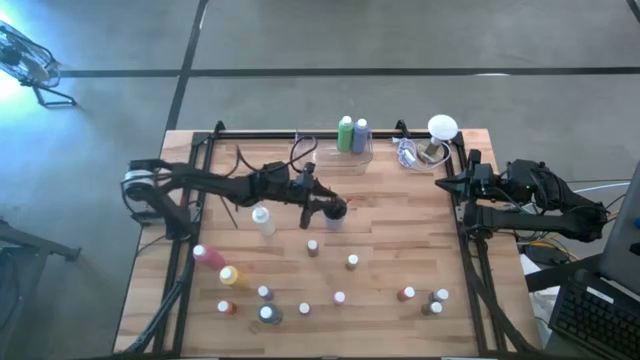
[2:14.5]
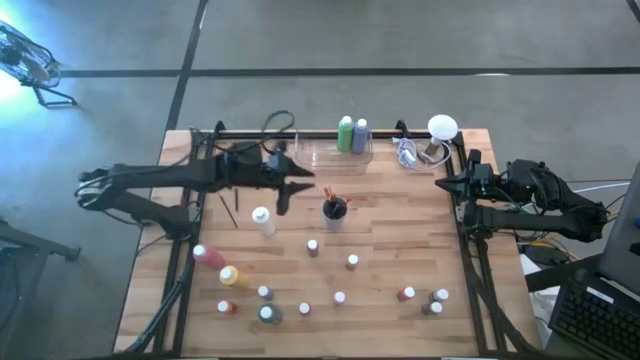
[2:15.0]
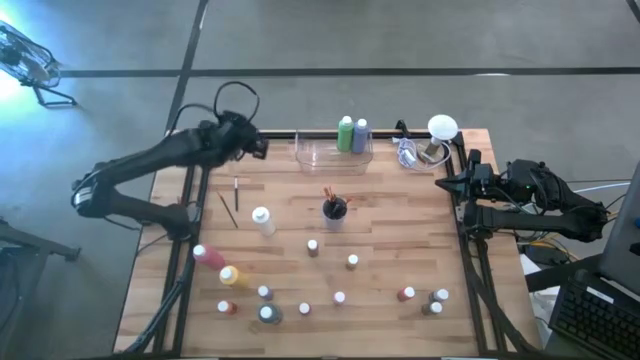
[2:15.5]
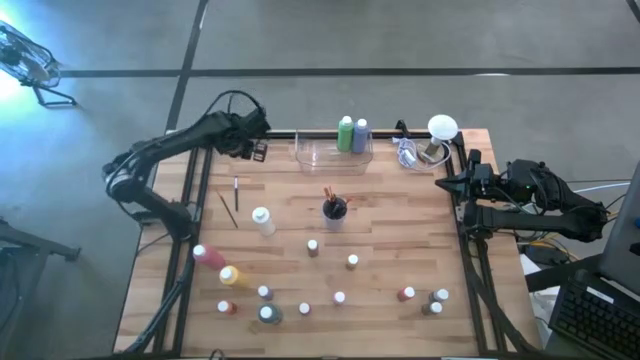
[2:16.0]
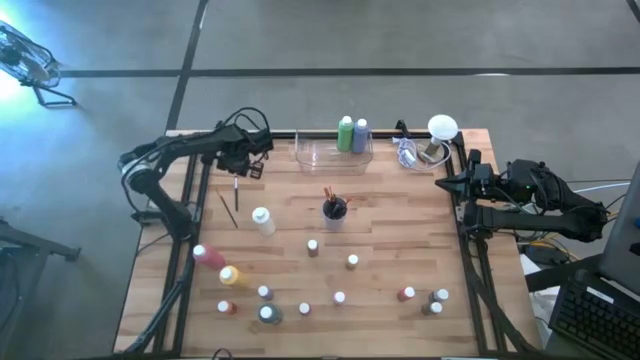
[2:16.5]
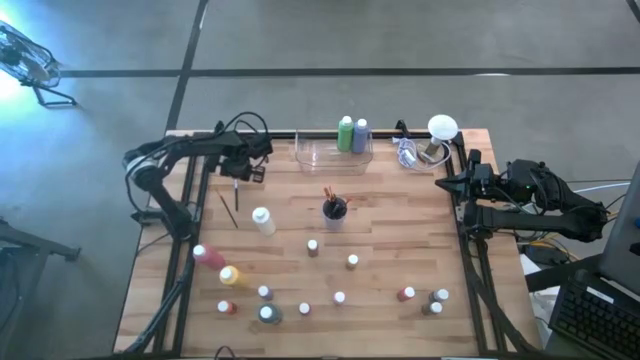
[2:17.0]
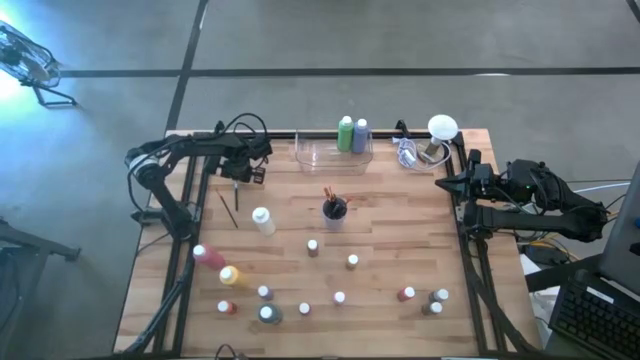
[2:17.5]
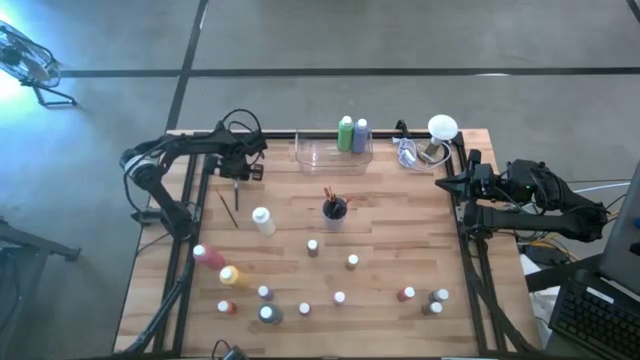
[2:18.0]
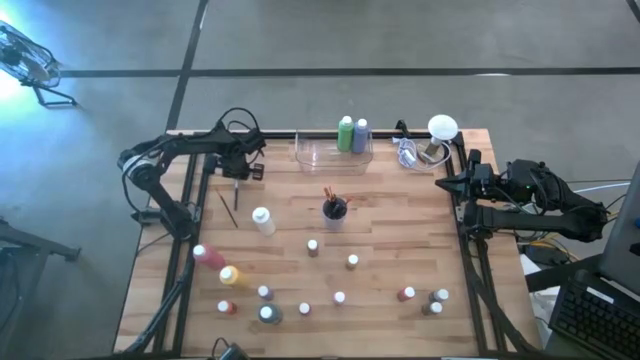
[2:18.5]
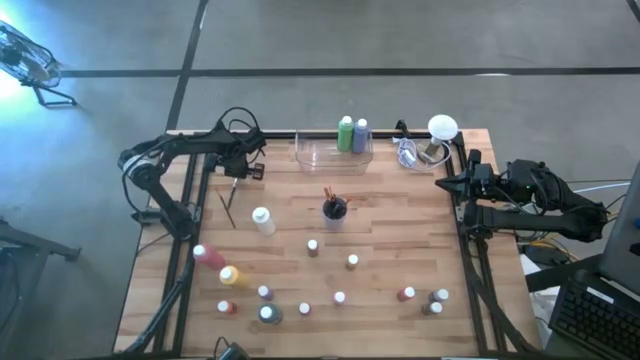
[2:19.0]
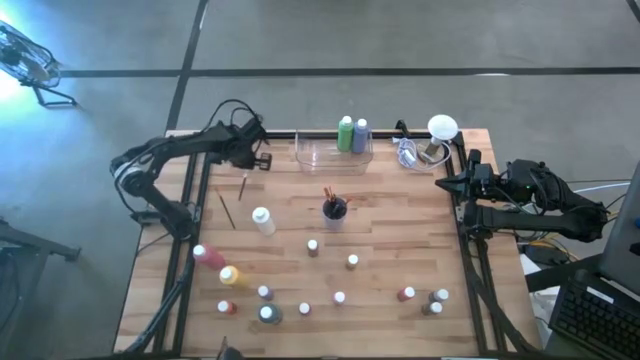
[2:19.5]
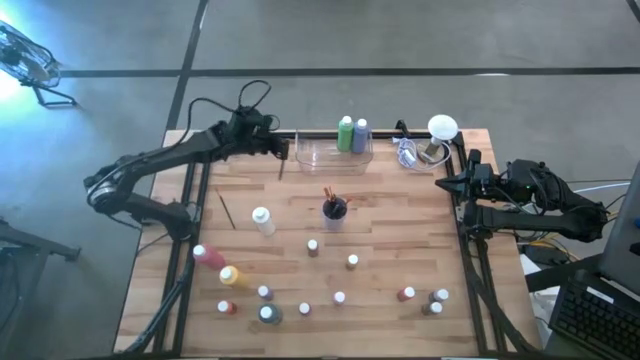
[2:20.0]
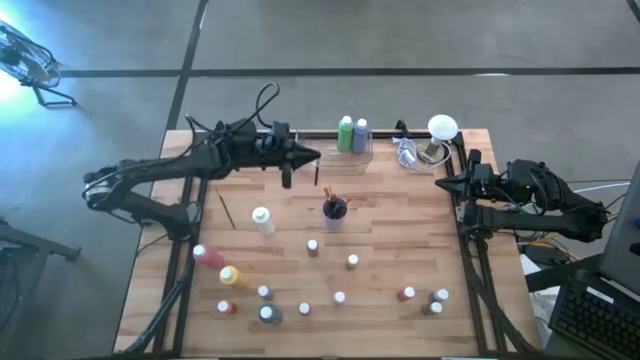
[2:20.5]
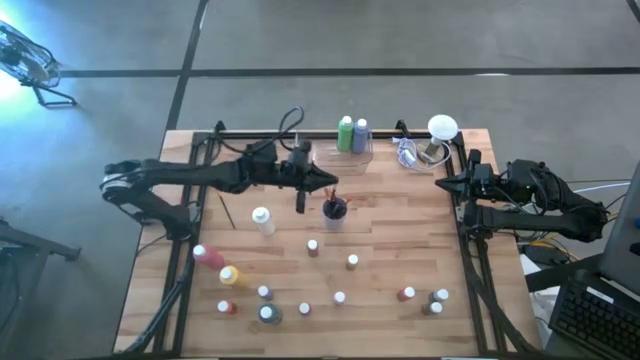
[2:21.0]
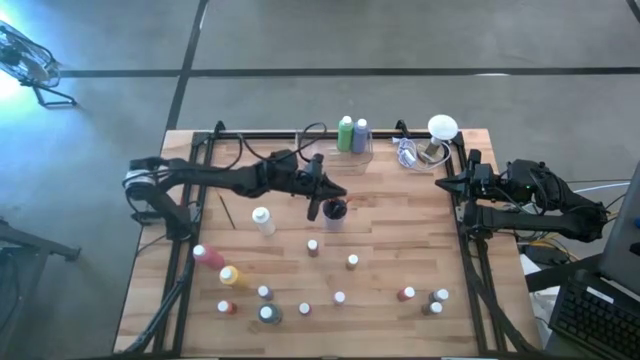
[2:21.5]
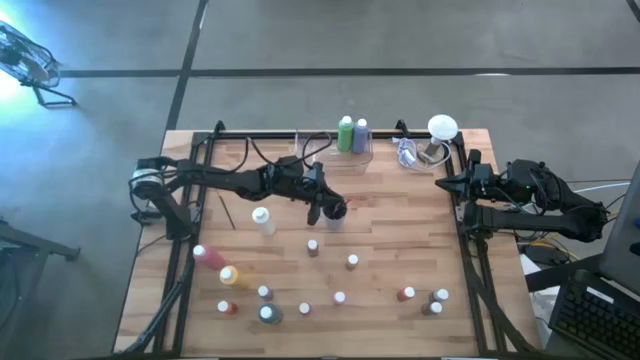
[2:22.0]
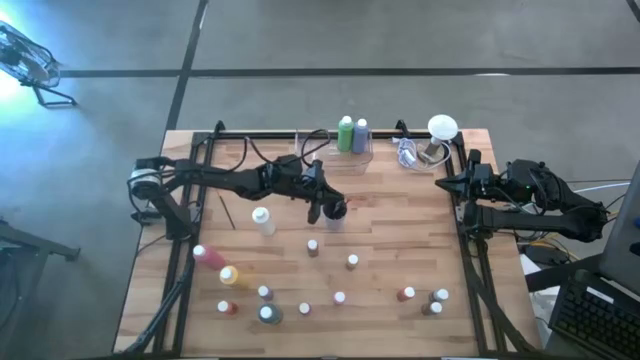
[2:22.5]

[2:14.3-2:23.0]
Task: Pick & Place Paint Supplies
Put the silver paint brush into the purple cup

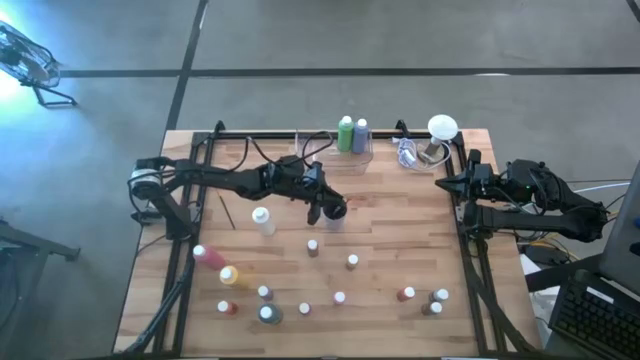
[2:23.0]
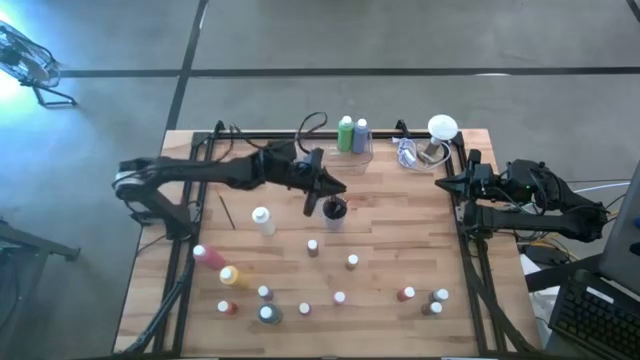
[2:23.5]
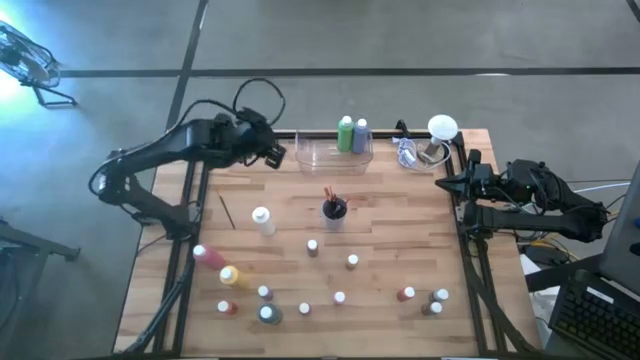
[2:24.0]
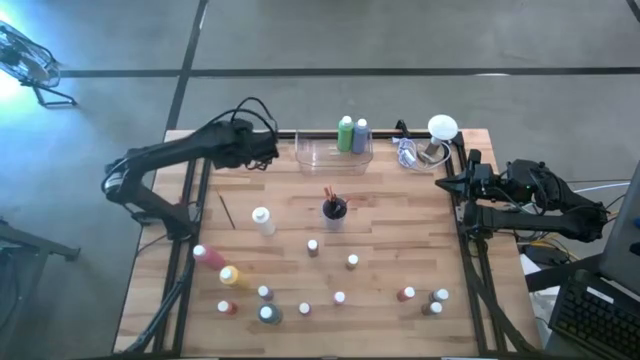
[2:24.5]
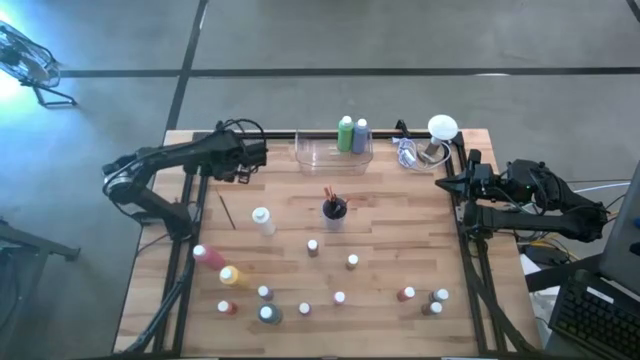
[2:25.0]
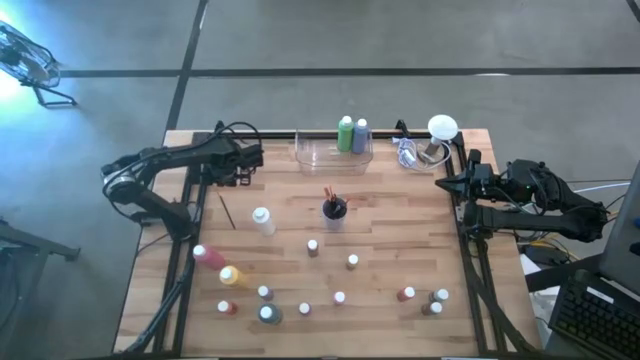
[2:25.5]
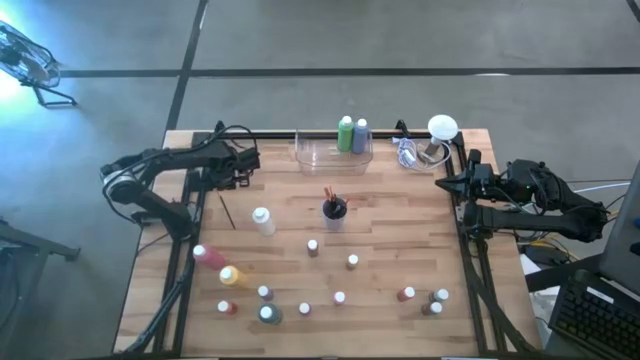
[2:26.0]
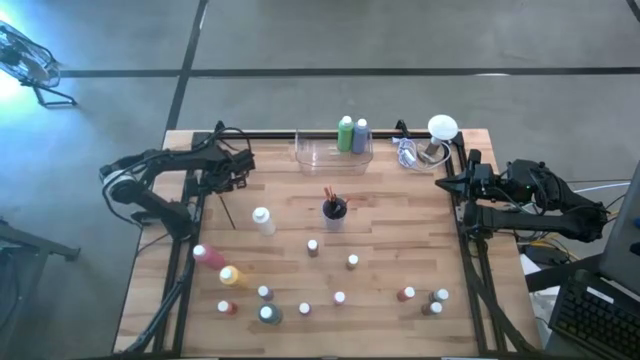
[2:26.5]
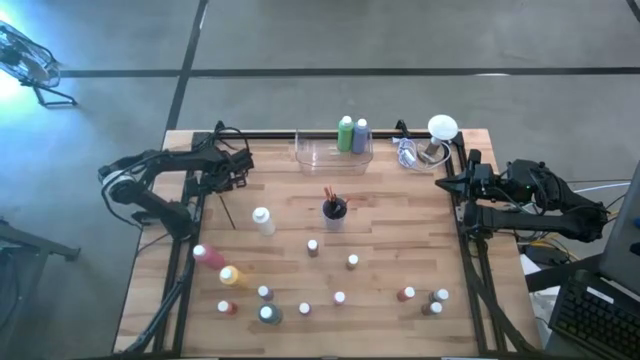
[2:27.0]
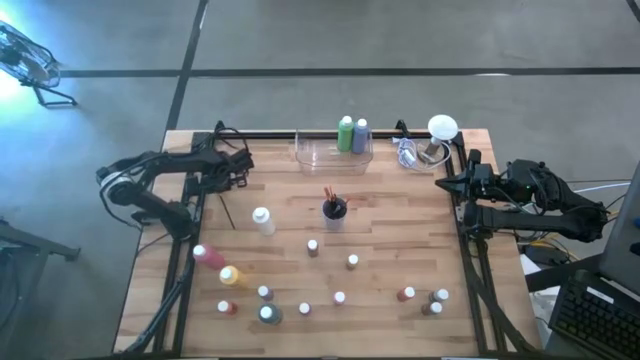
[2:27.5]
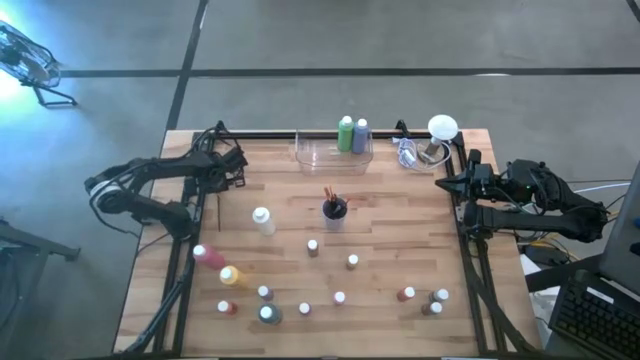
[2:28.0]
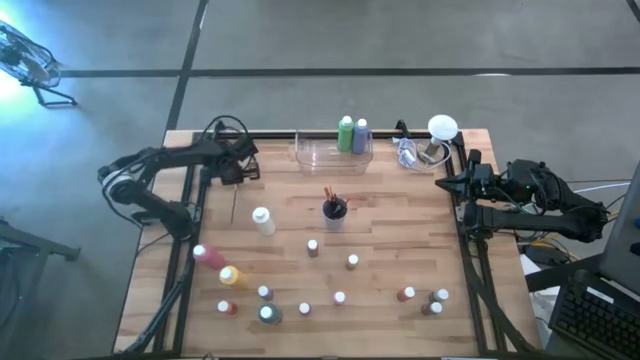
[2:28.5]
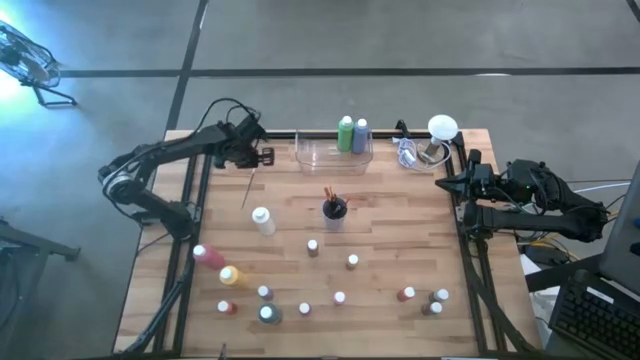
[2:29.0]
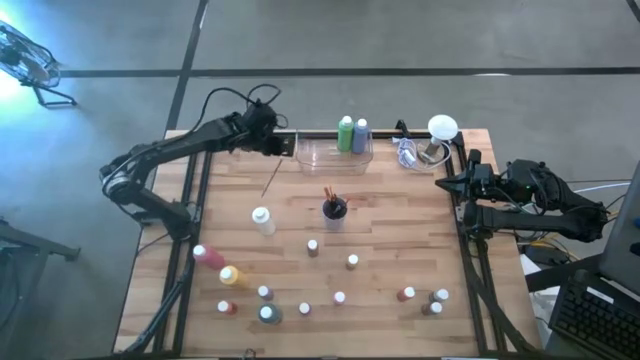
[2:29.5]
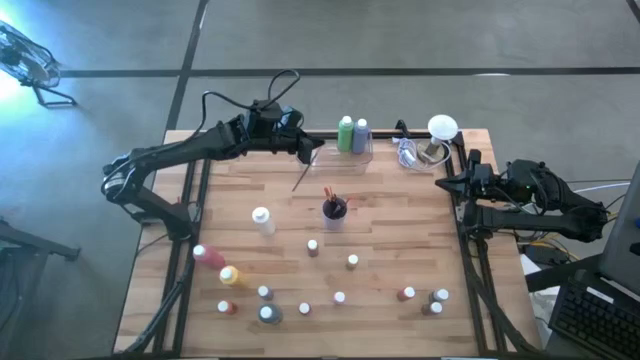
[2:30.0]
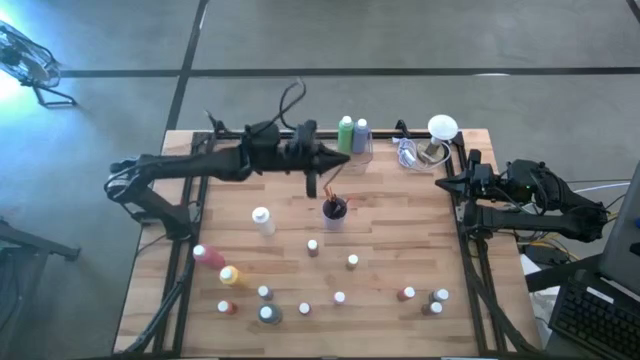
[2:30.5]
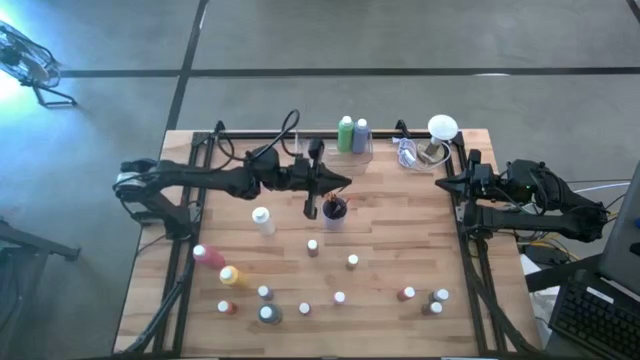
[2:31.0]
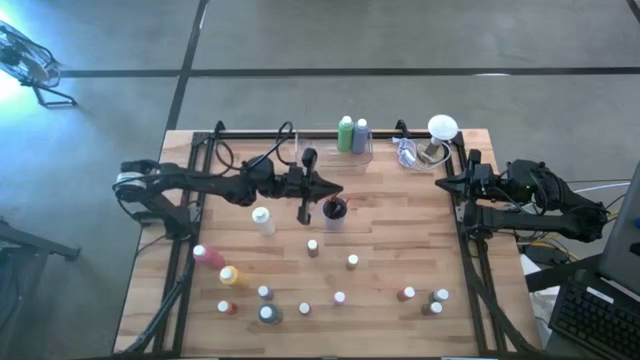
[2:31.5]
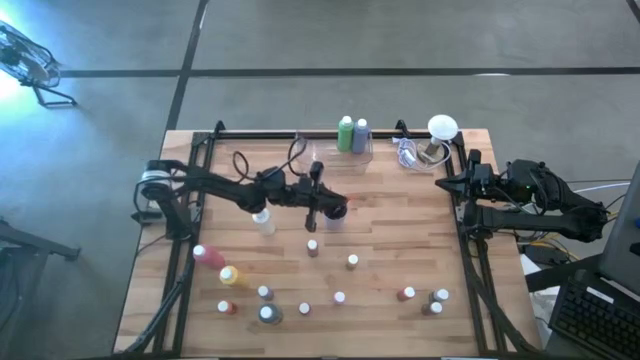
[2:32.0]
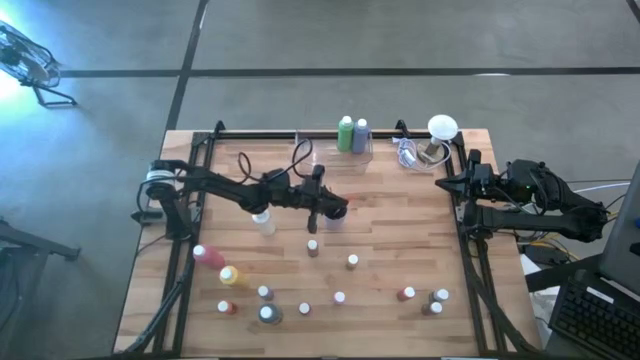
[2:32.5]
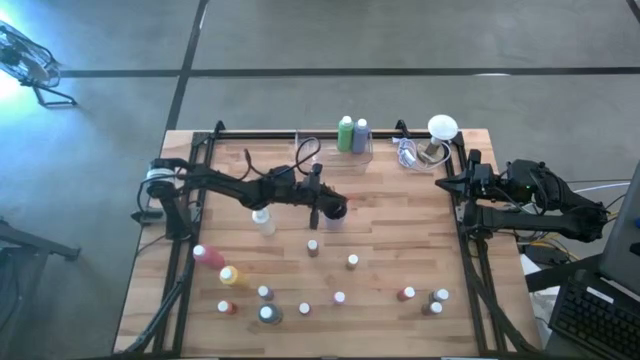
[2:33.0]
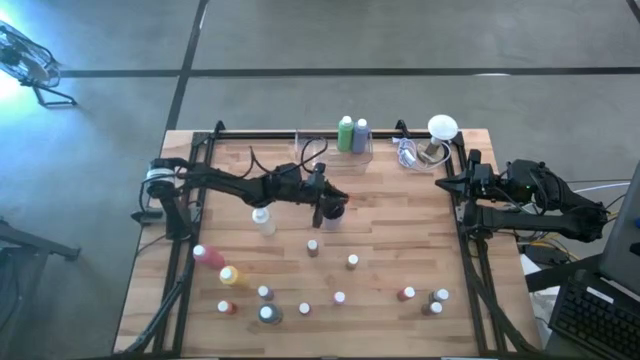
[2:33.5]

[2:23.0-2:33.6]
Put the gold paint brush into the purple cup

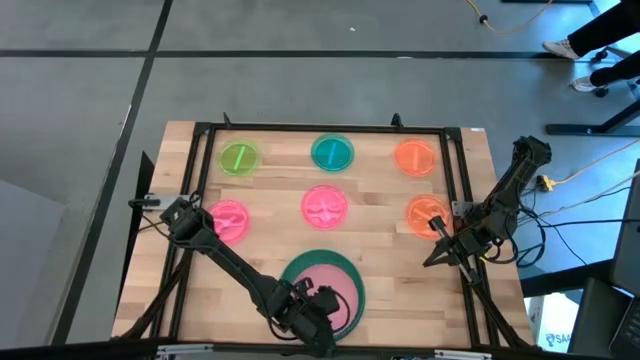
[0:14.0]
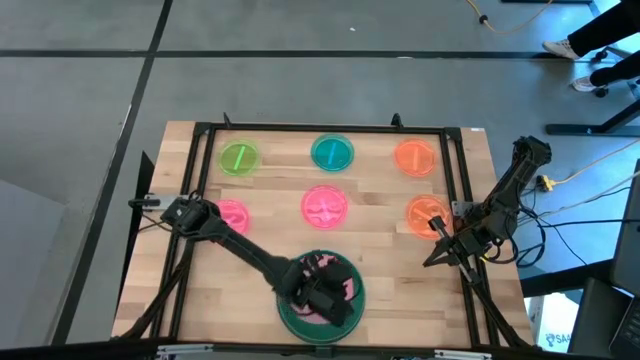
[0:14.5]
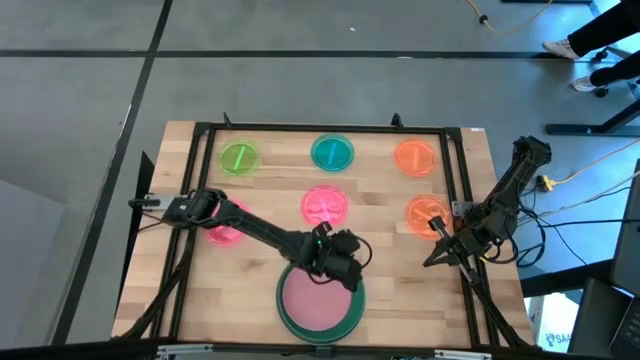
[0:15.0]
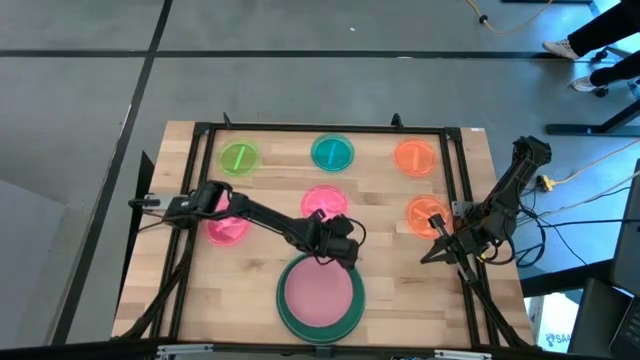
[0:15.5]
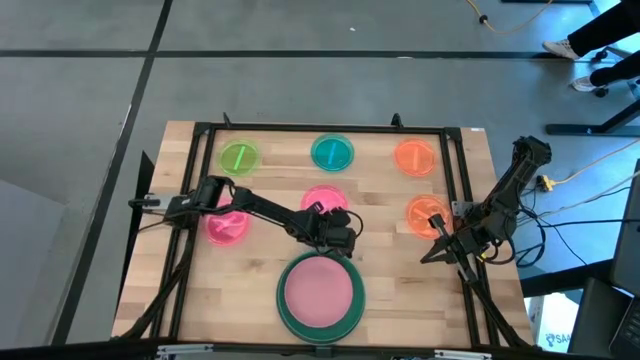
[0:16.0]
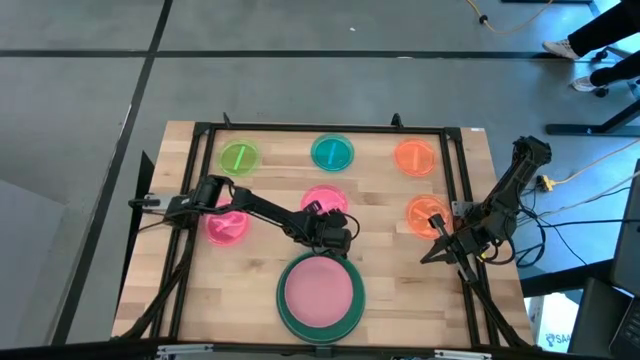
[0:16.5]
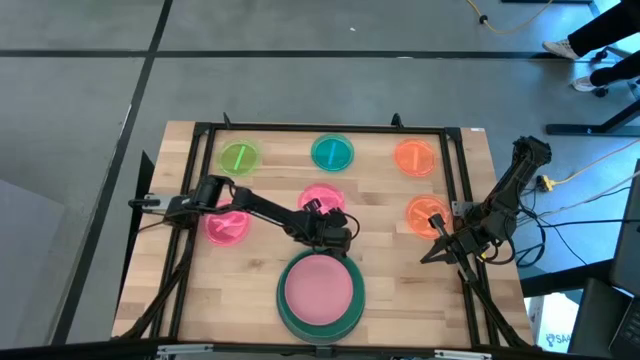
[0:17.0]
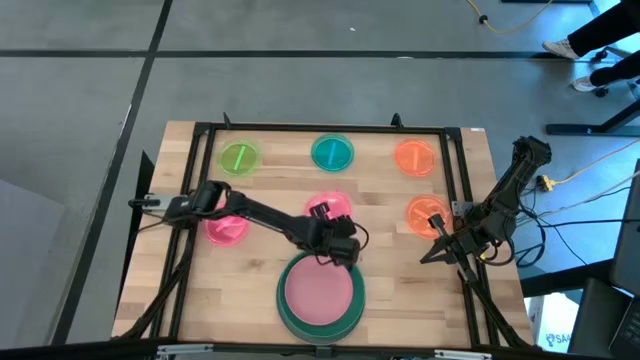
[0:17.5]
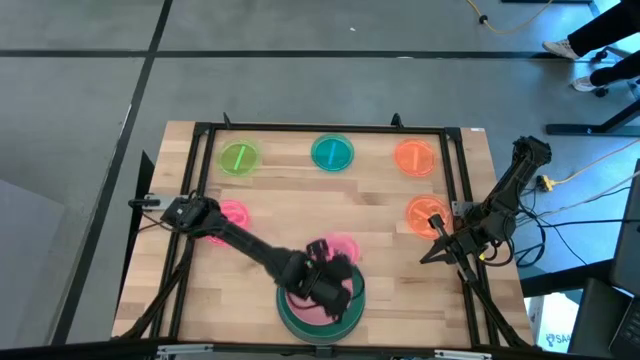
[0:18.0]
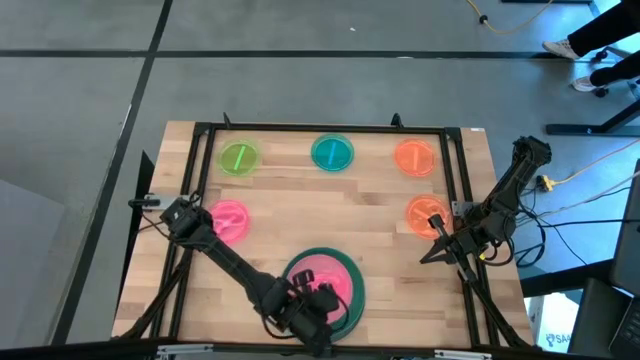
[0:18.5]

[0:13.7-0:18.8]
Task: Stack plastic plates
Stack the right light pink plate on top of the pink plate
